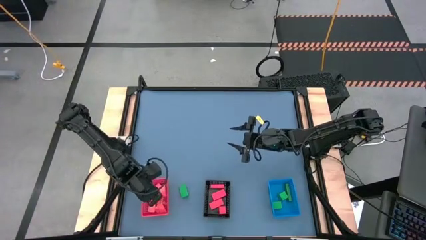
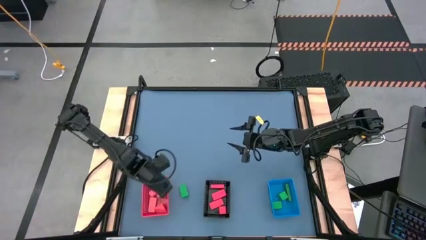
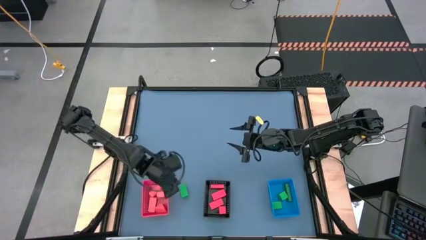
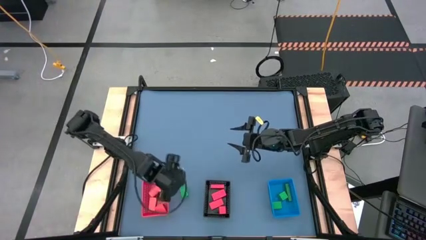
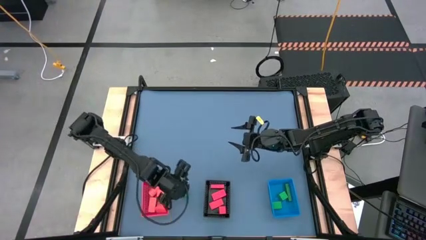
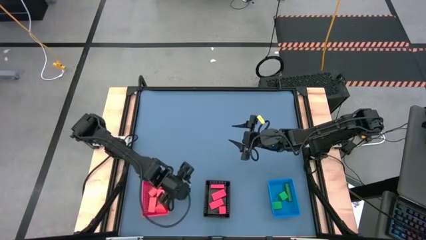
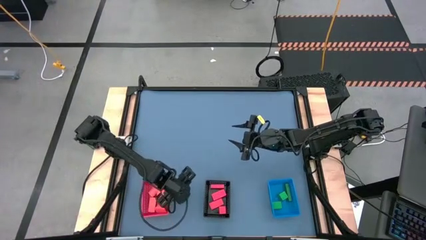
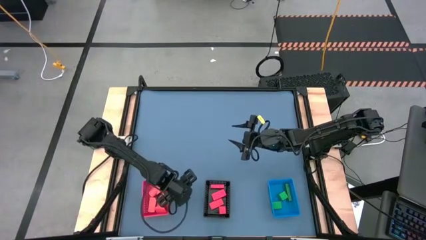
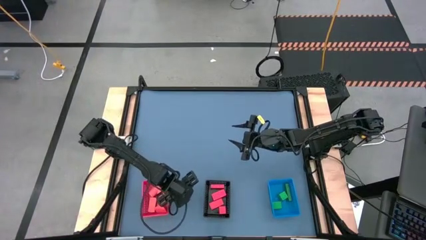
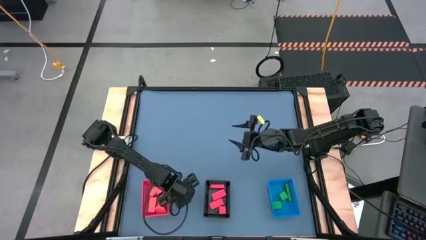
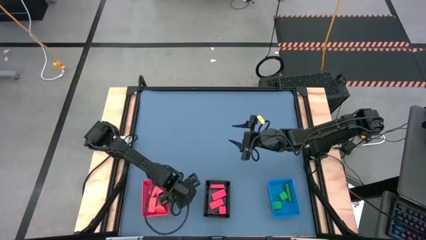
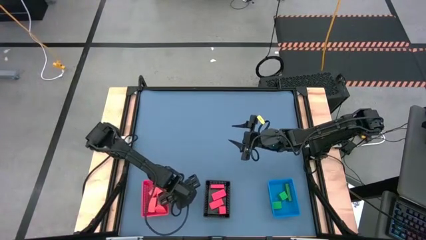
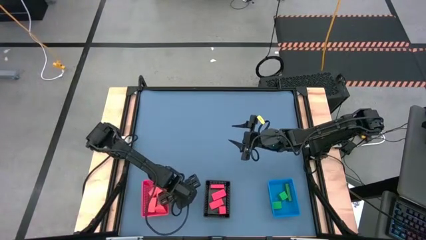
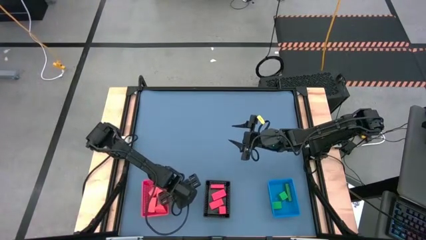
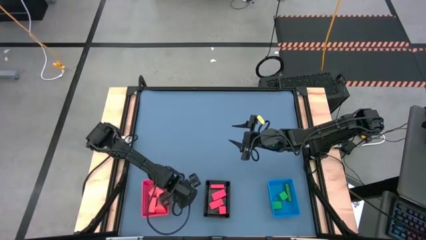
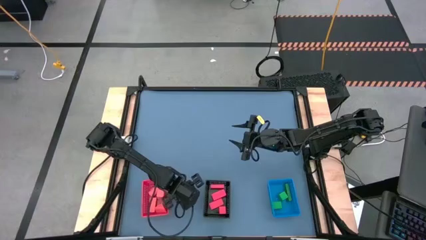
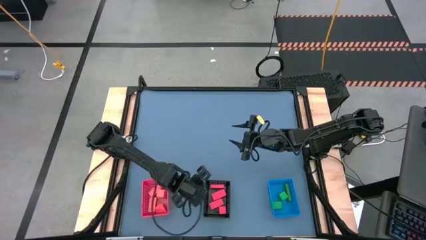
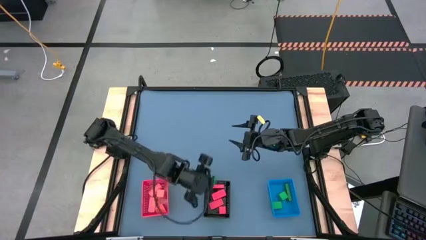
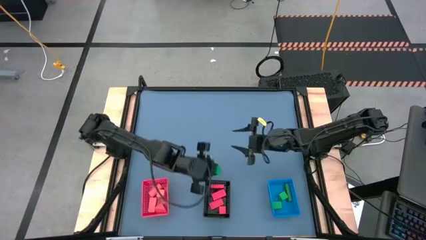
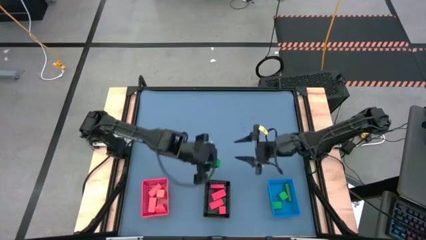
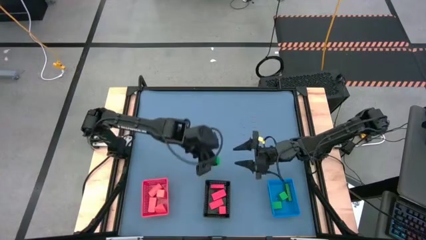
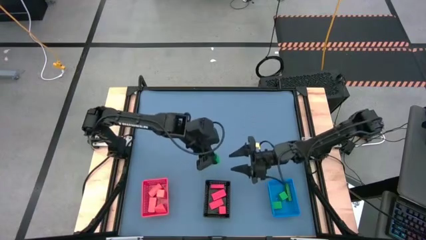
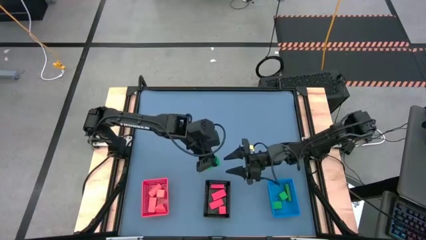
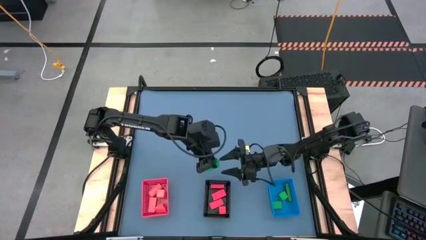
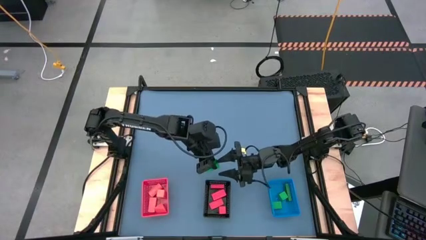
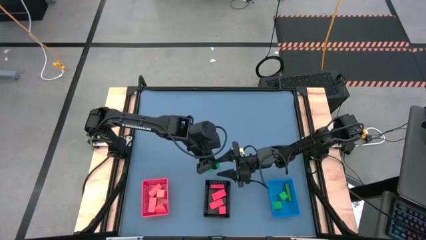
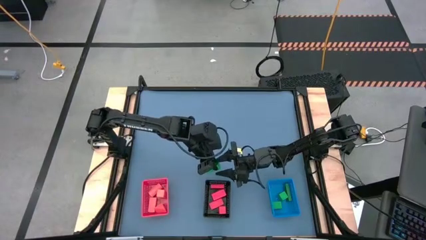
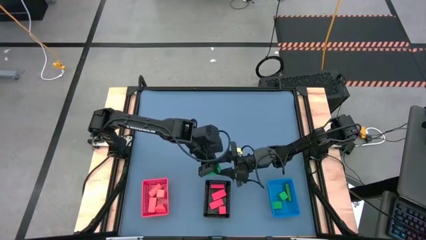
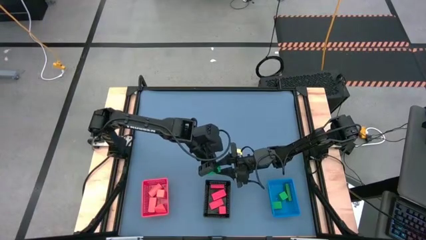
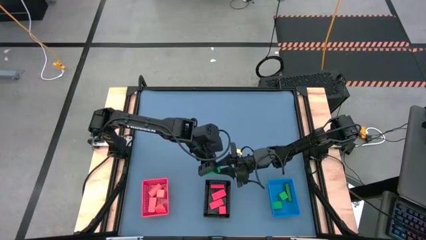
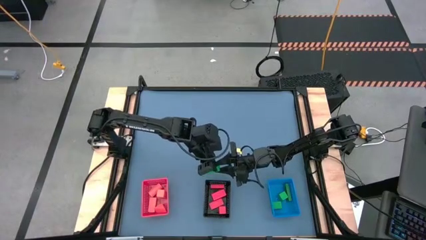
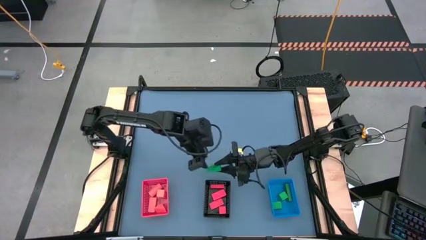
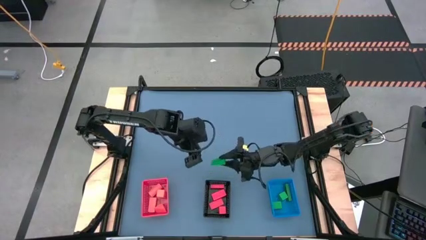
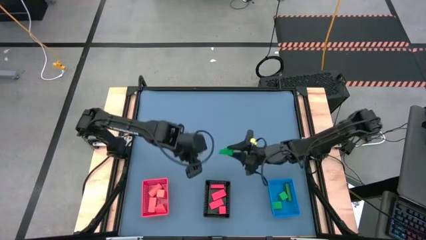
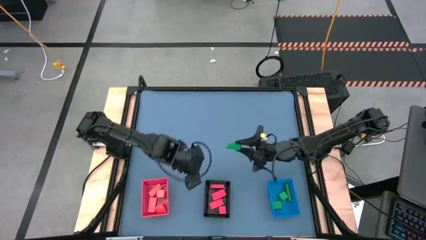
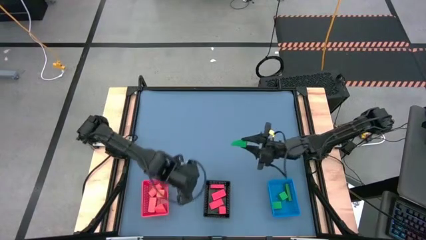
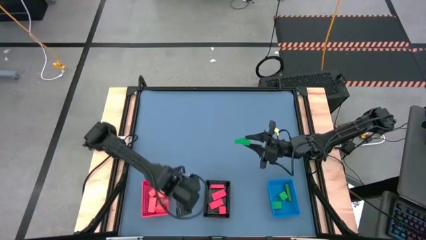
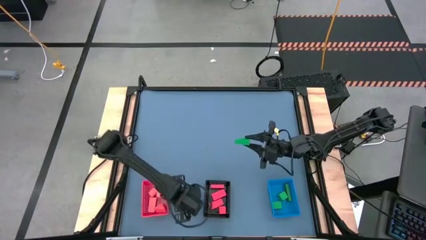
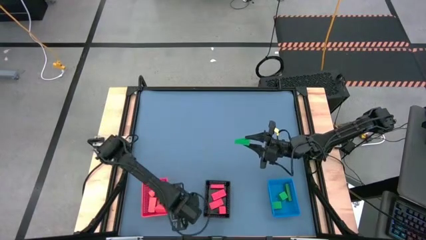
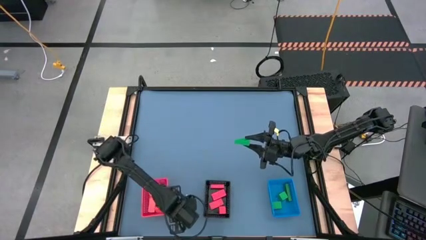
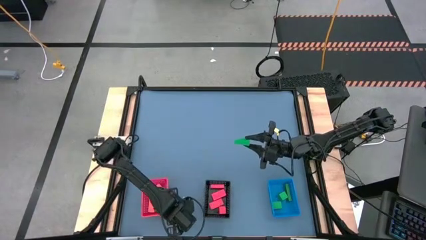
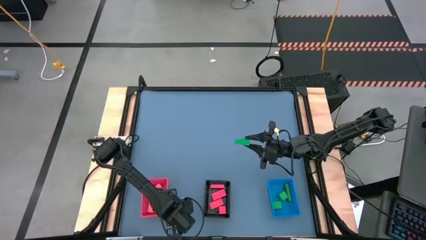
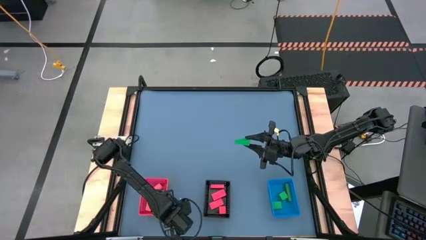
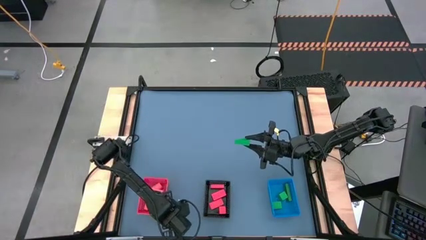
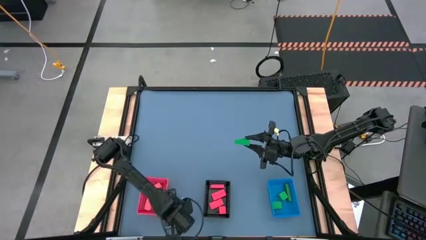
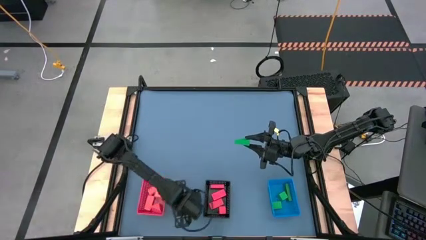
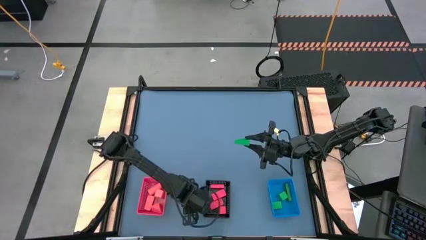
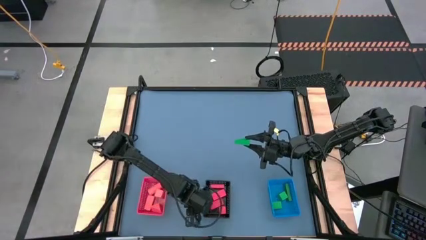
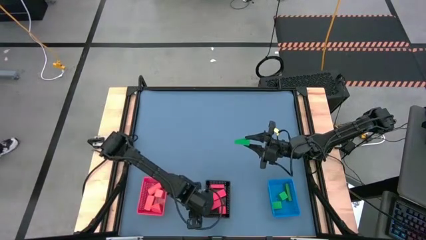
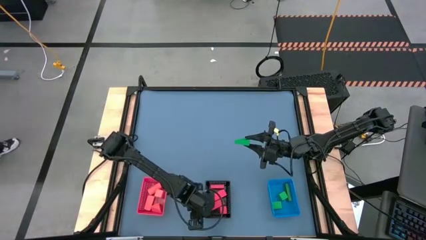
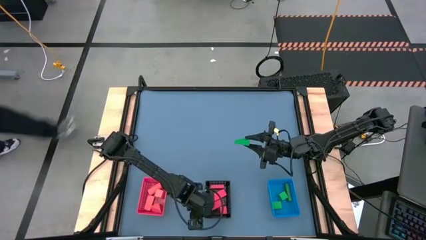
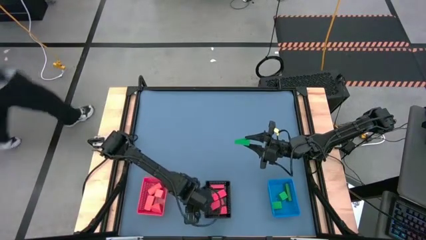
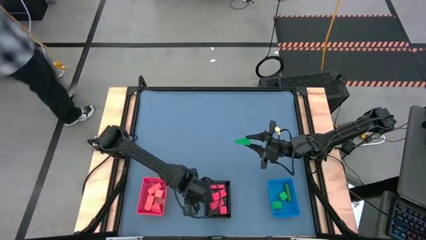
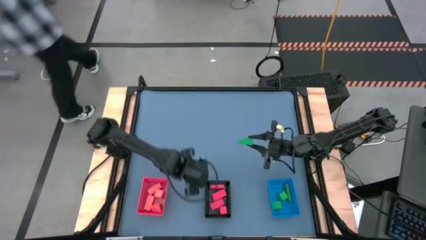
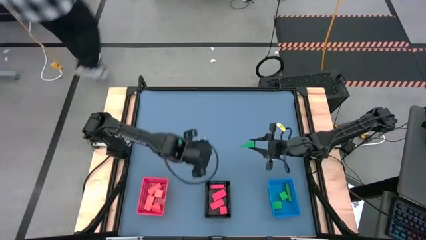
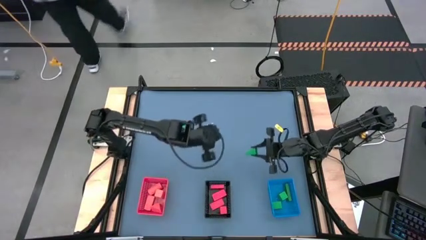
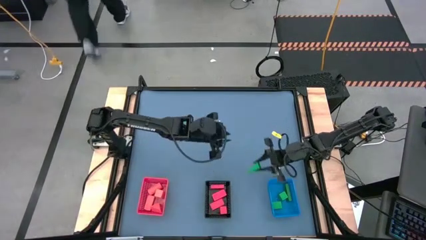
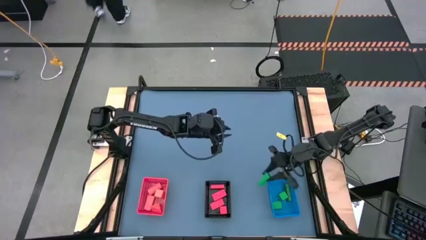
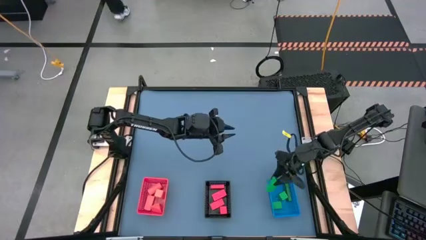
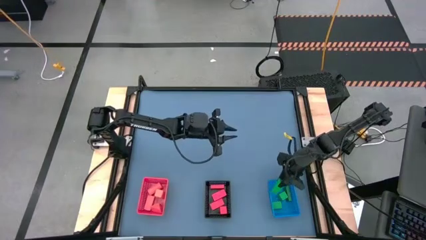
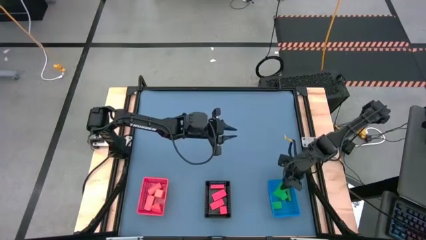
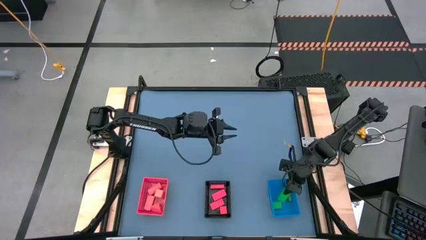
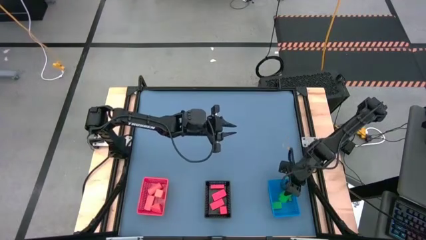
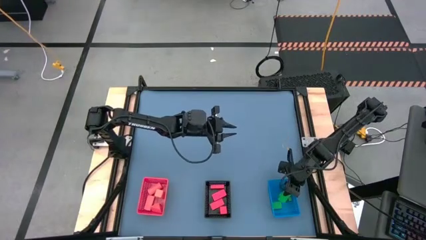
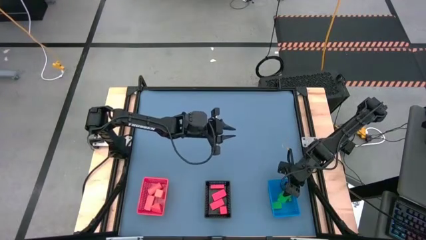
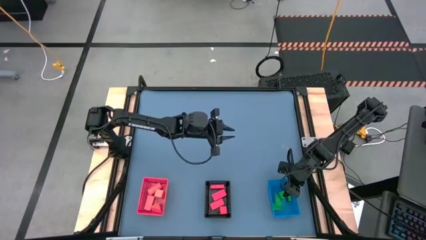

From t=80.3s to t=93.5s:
Task: Sort & place blocks by color
Put the green block into the blue bin
